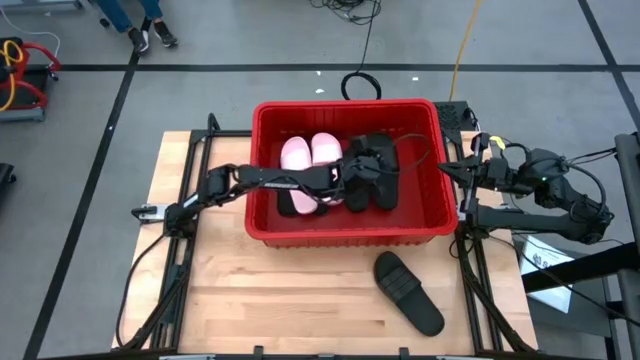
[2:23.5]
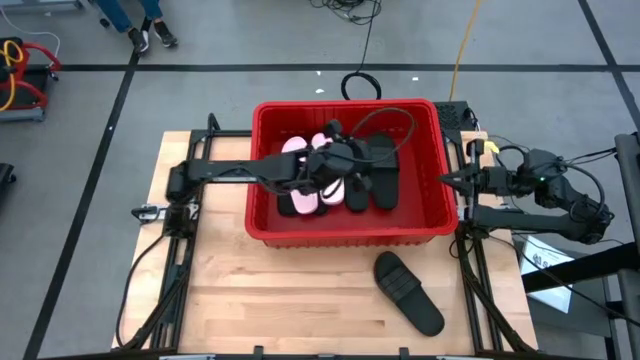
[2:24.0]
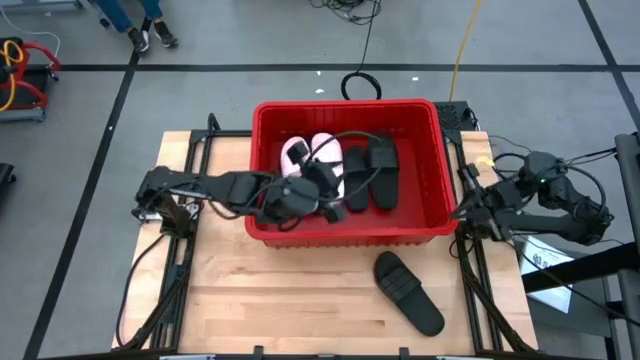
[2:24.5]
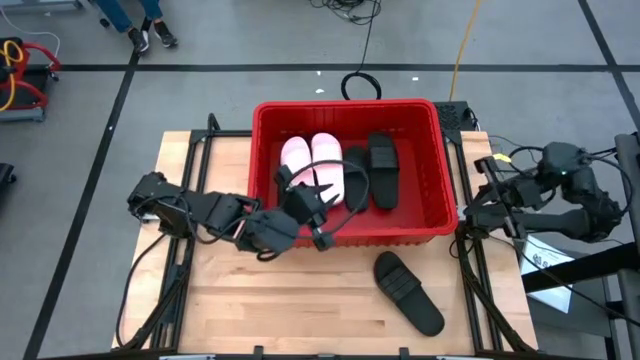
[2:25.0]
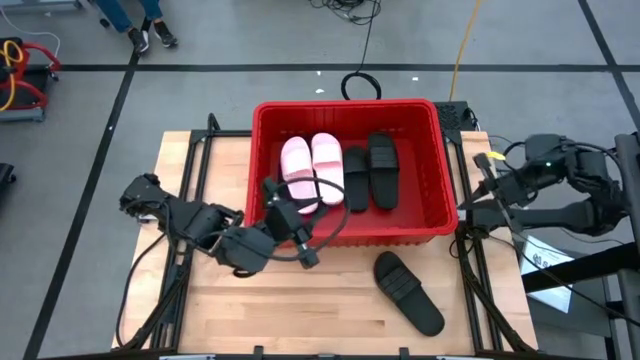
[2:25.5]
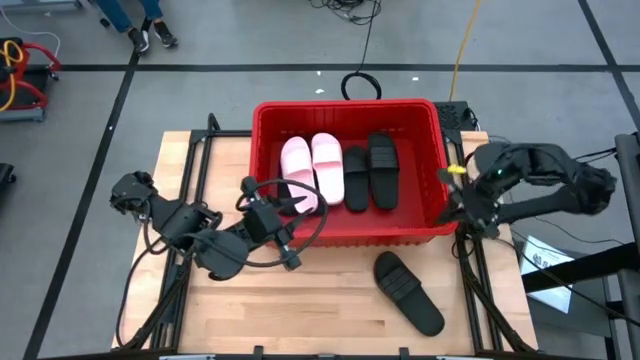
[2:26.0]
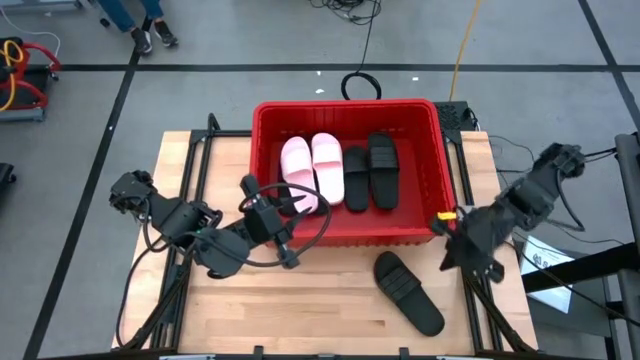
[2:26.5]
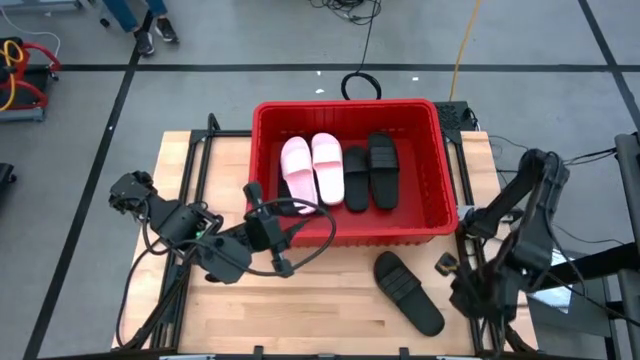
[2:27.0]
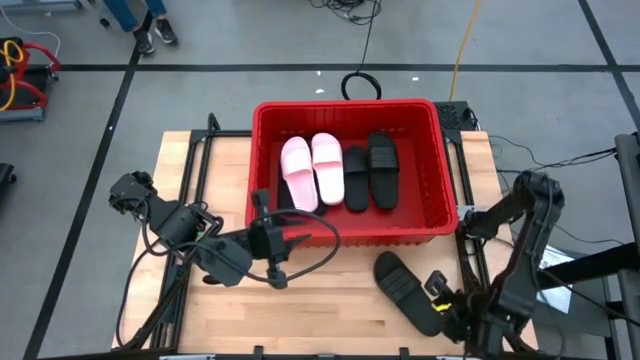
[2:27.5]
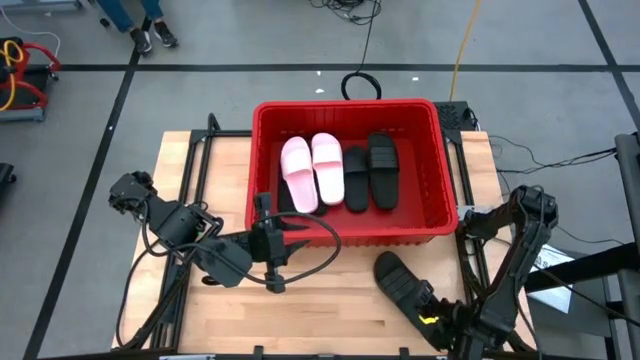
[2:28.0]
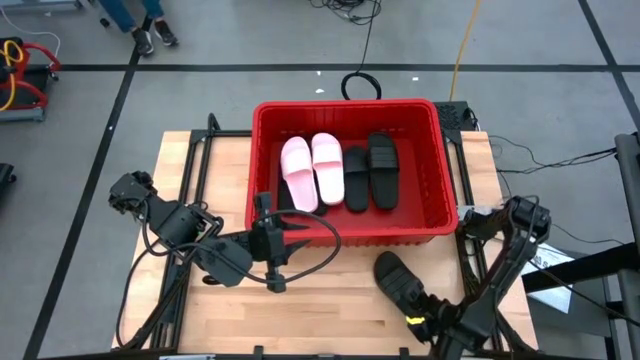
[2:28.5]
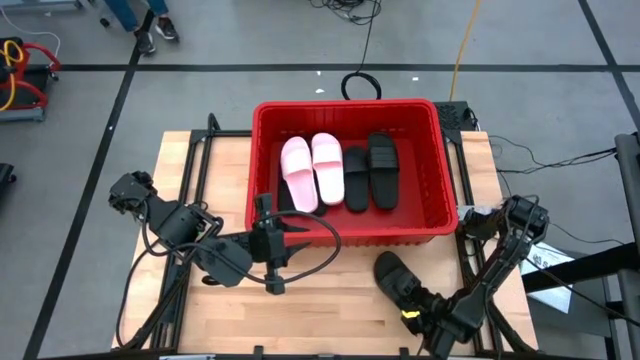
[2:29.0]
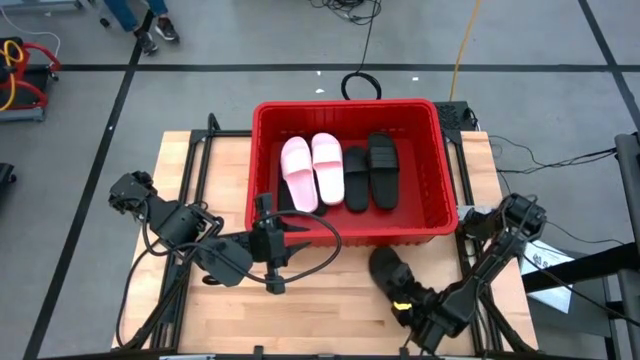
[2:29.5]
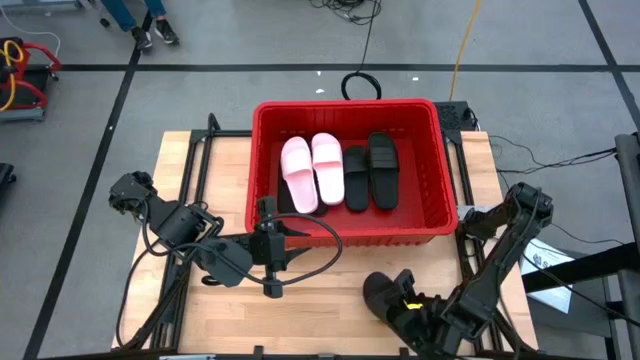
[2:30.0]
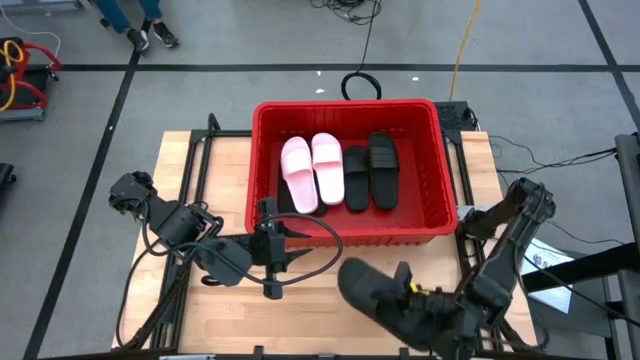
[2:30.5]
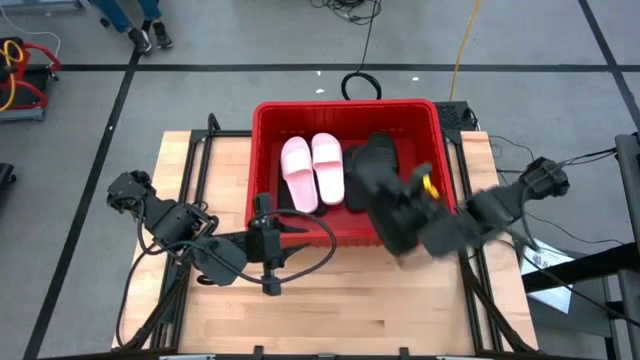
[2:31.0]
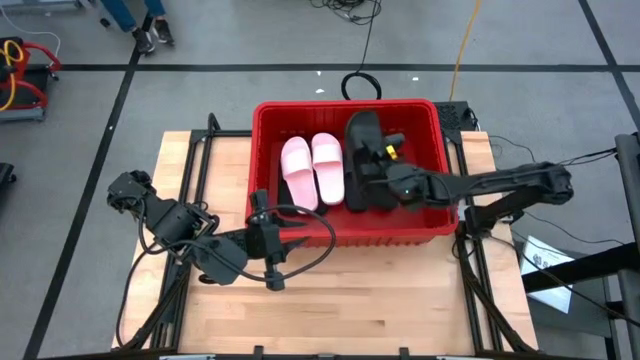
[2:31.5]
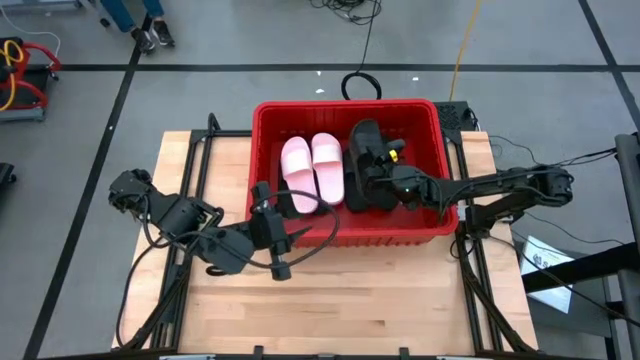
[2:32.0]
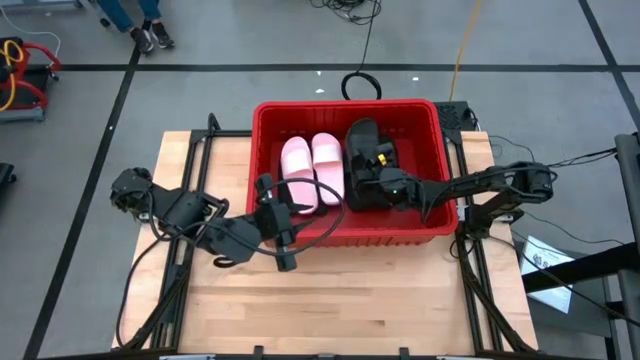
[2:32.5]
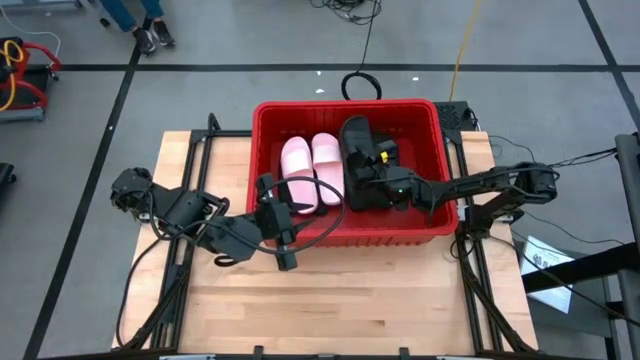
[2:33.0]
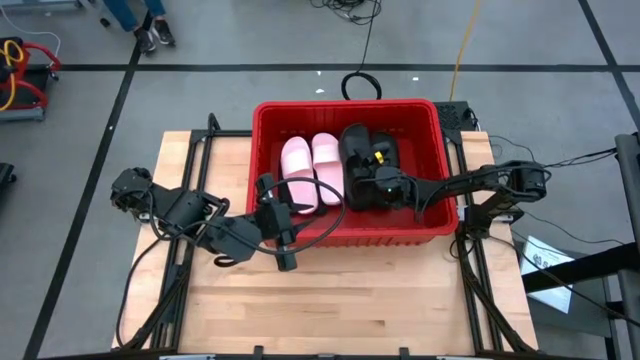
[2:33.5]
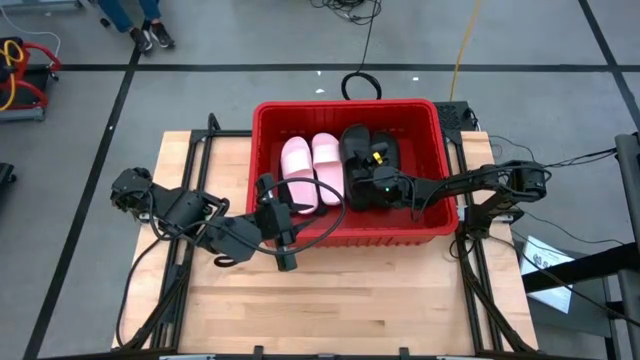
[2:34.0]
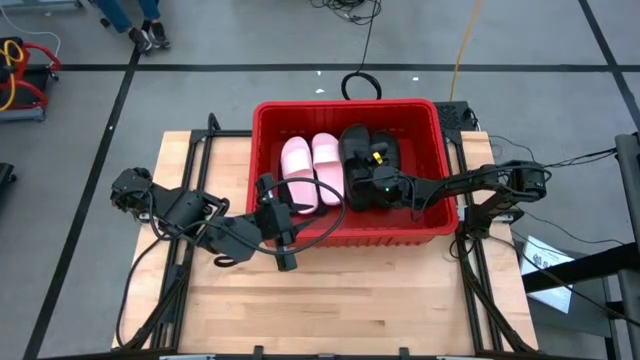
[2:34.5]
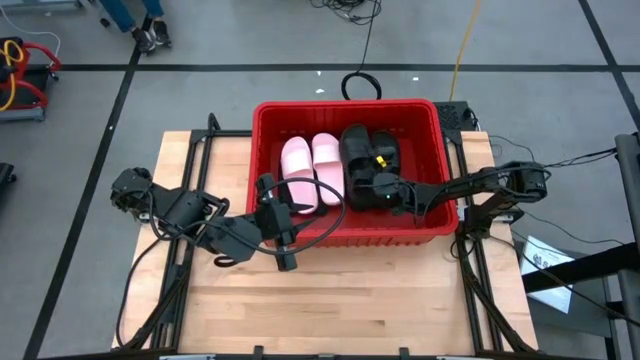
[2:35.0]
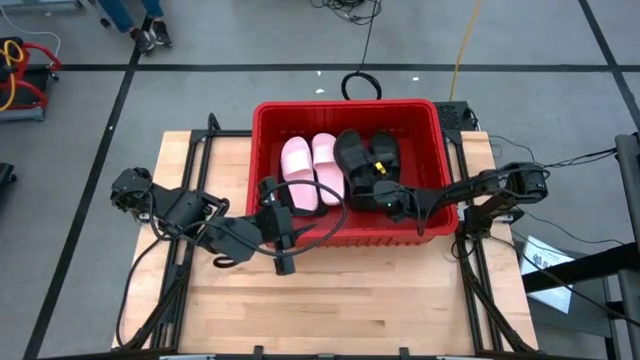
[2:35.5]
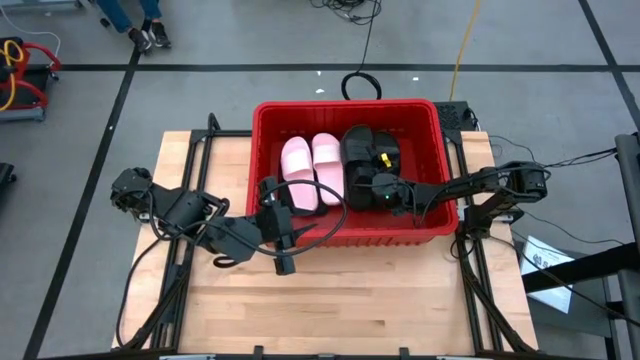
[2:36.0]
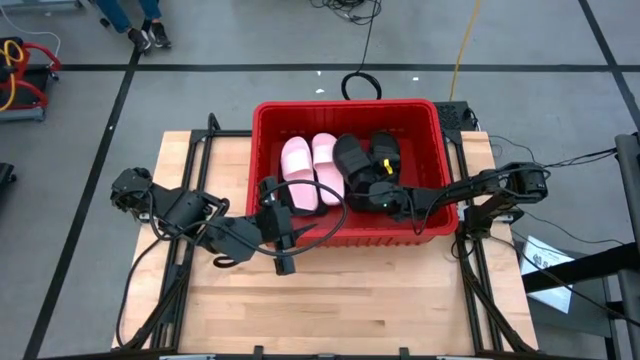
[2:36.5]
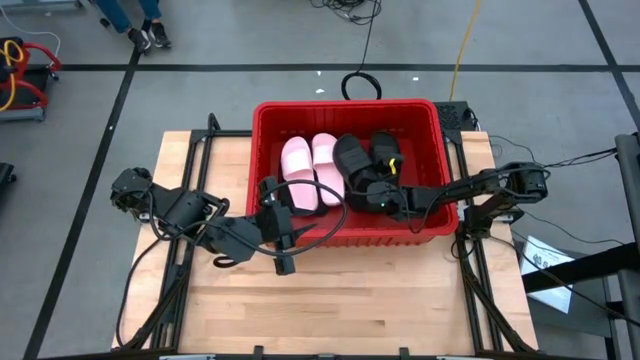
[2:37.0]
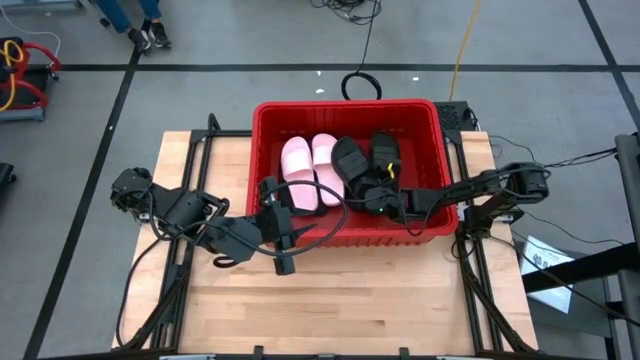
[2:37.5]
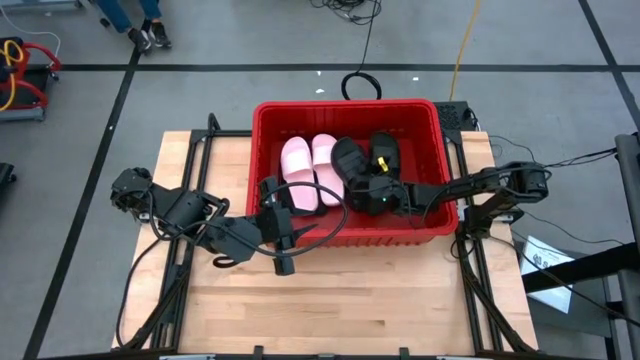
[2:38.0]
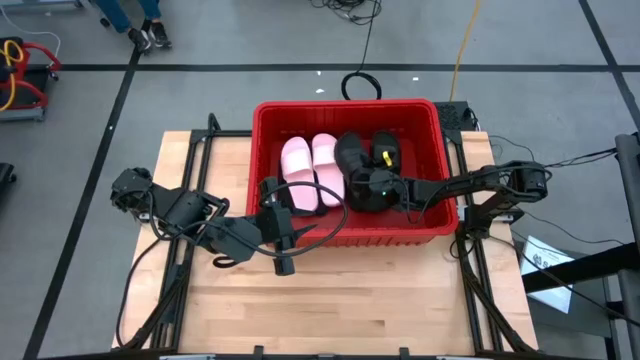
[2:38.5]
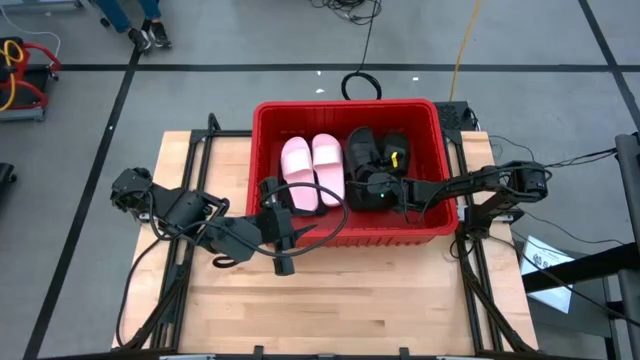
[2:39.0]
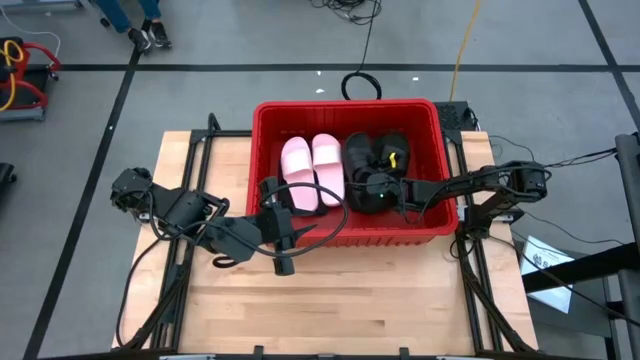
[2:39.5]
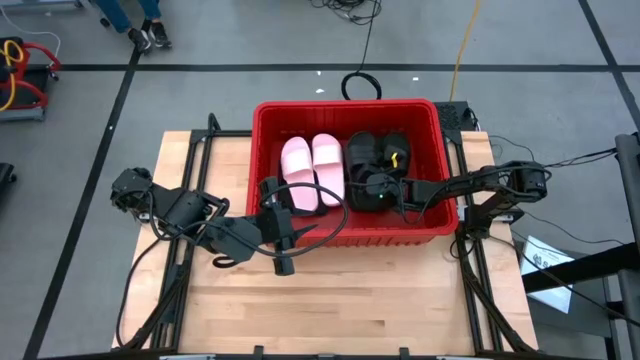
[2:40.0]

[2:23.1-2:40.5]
Task: Pick and place slides into bin
Put the black slide into the red bin

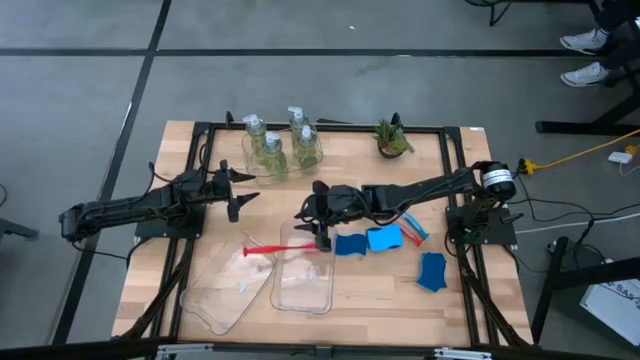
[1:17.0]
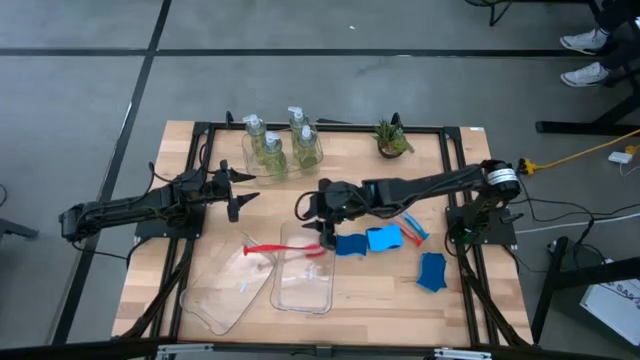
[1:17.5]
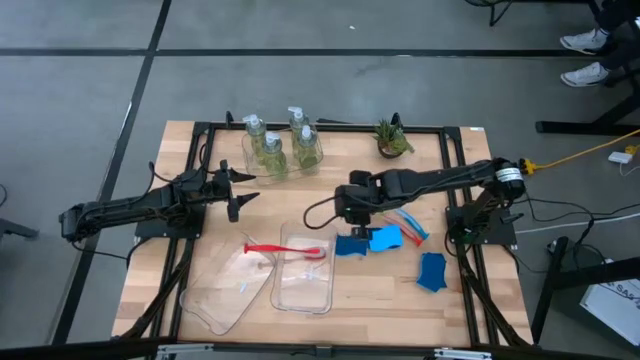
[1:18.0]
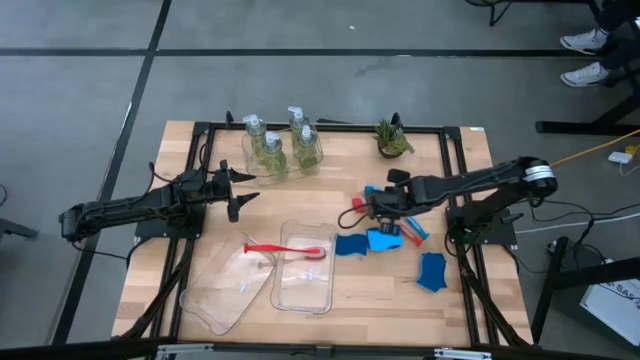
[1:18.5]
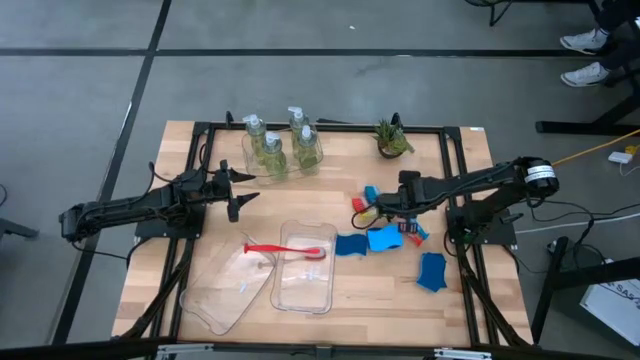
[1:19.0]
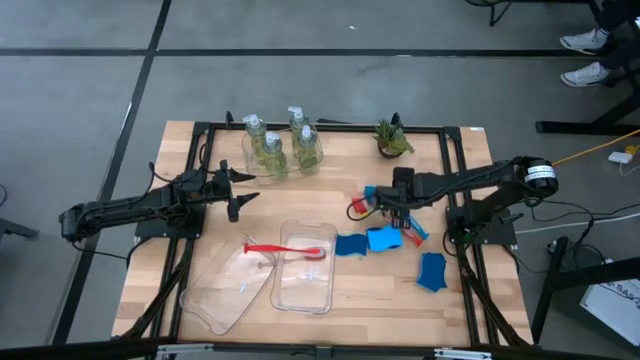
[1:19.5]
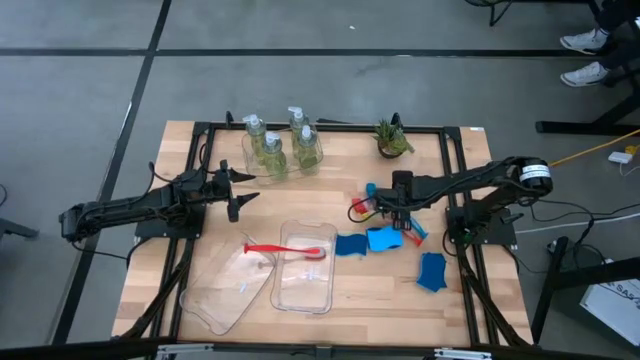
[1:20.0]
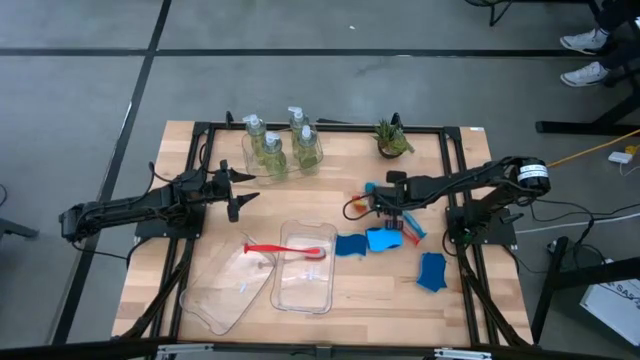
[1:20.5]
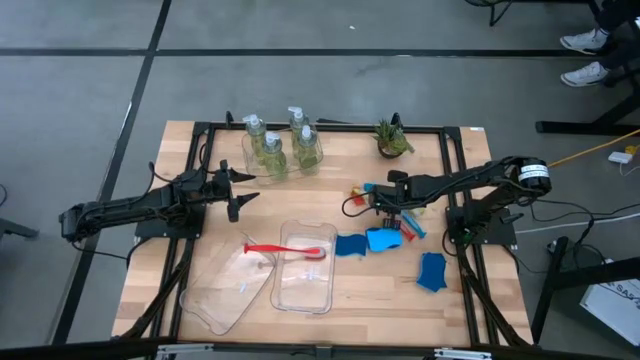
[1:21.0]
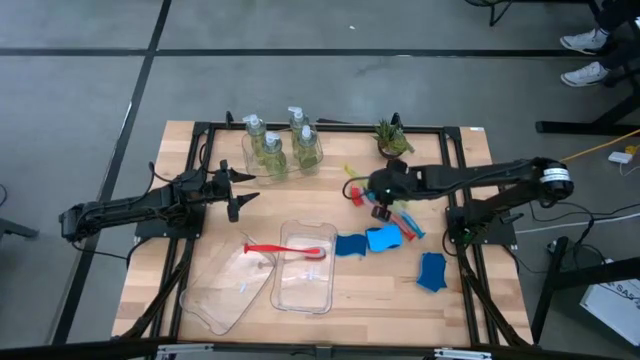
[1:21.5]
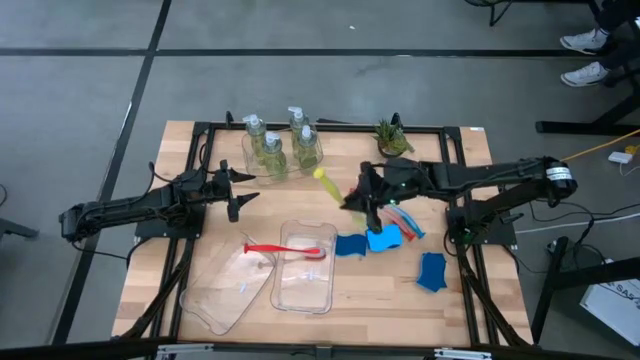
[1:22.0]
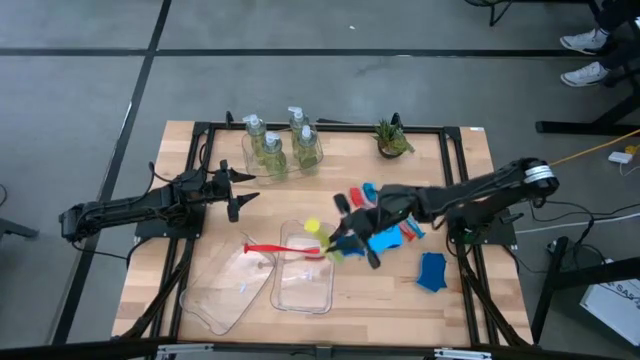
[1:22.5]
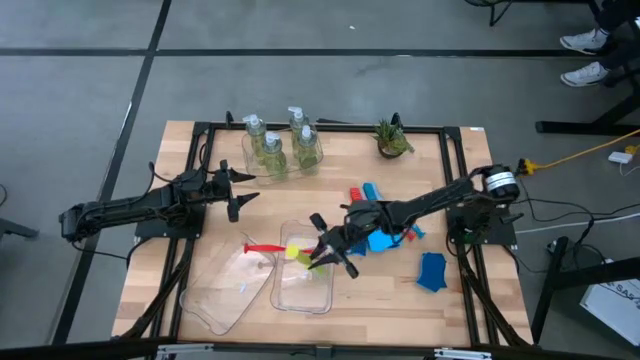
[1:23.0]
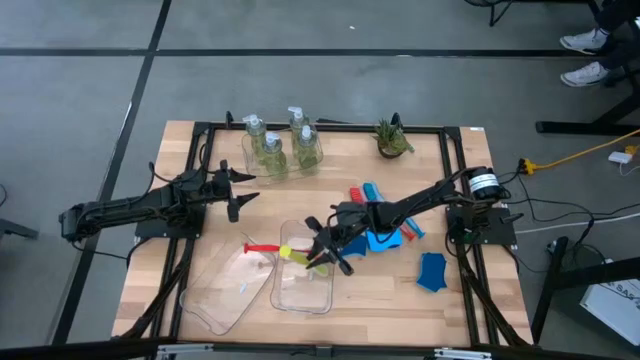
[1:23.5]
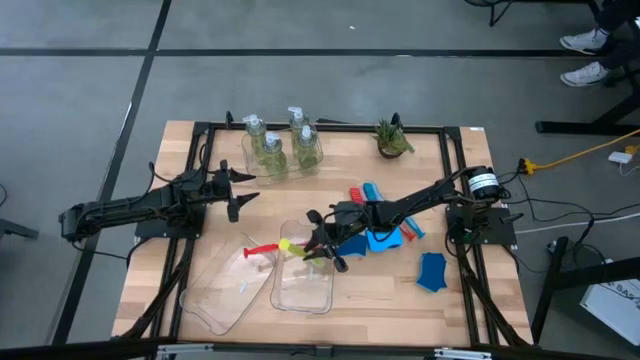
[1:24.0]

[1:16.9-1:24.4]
Task: Pick & Place Kitchen Sink Supplies
Put the green dish brush into the right transparent bin
